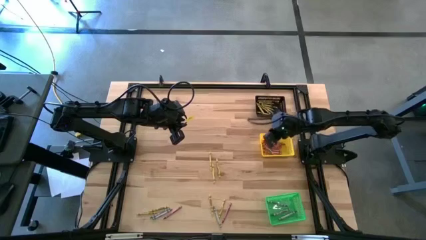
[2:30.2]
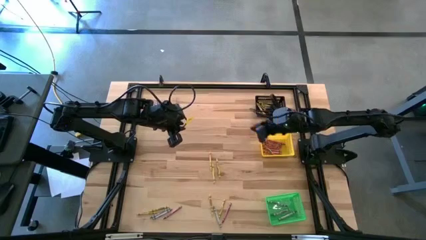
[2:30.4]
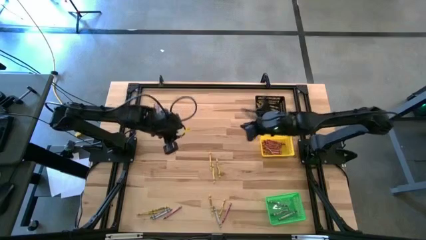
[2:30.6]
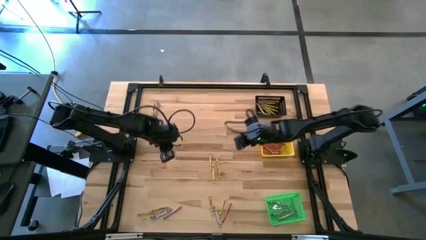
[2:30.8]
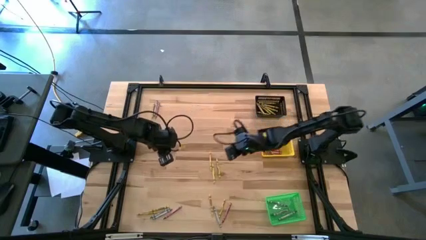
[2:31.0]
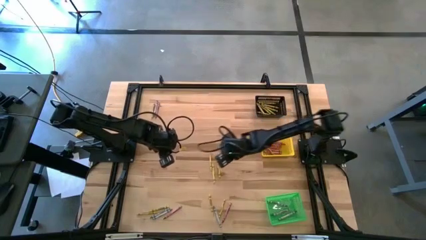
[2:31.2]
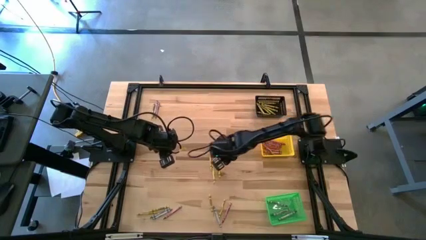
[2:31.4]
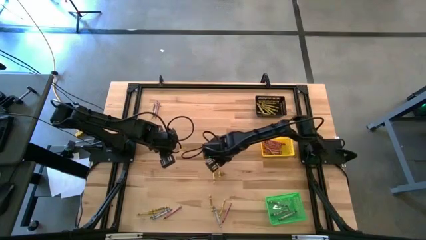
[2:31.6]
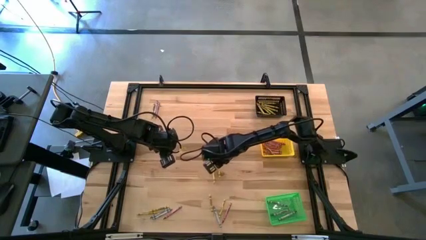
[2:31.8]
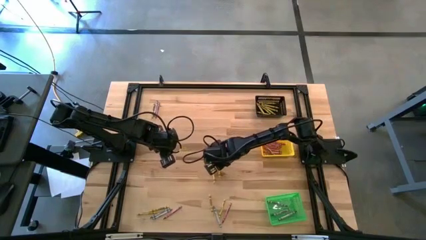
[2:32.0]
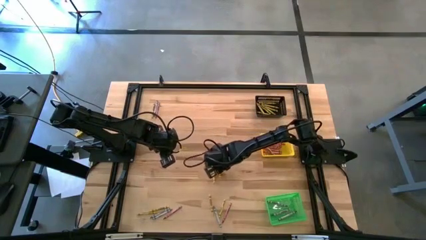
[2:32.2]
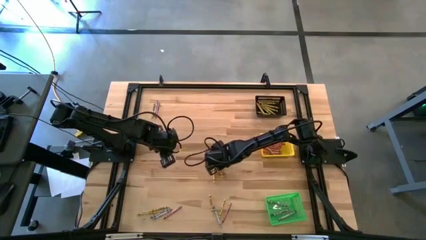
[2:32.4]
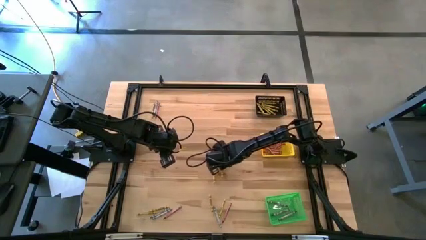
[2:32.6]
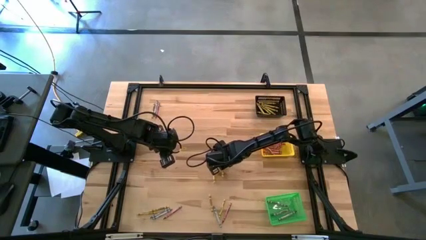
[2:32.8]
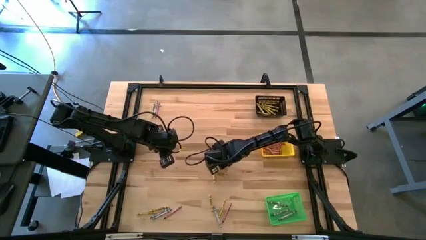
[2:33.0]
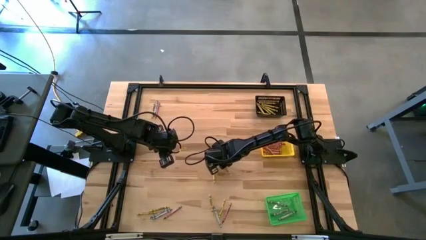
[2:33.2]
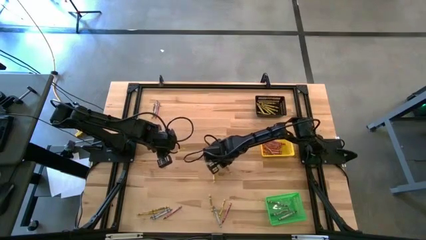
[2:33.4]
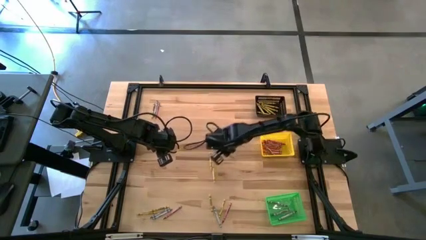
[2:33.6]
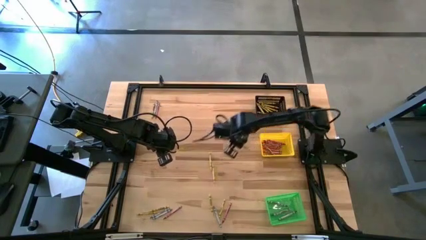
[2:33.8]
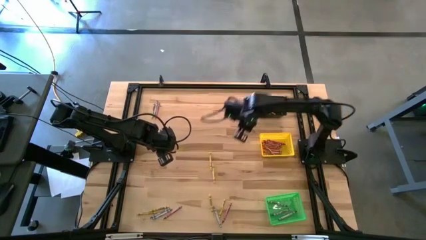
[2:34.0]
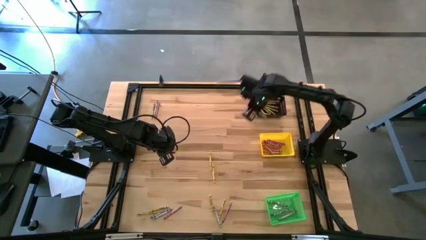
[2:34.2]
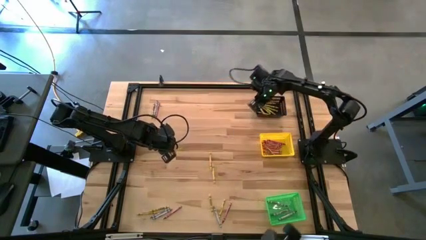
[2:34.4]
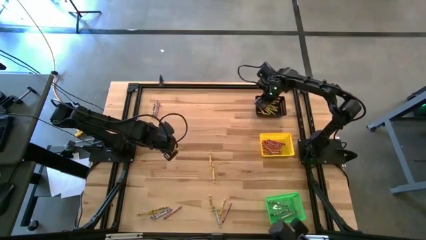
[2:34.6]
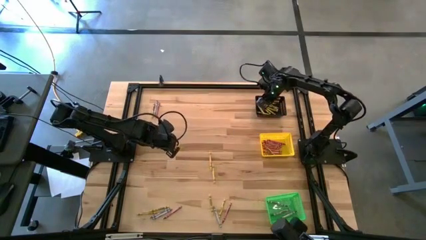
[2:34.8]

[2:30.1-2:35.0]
Task: Sort crayons
Put the yellow crayon into the black bin

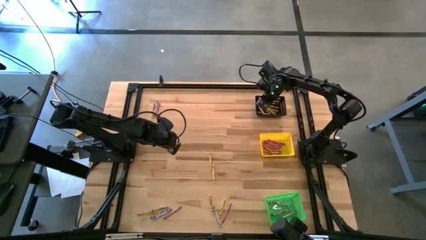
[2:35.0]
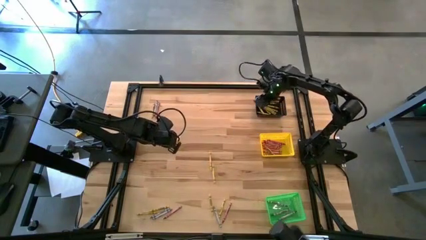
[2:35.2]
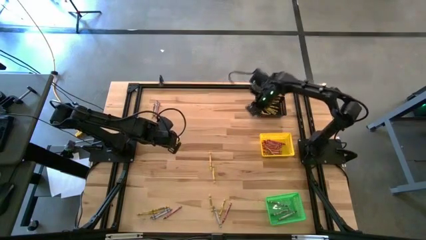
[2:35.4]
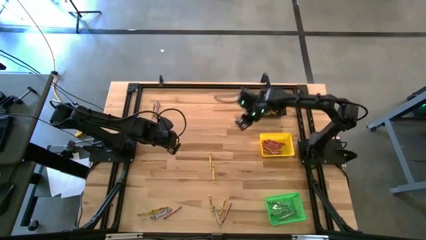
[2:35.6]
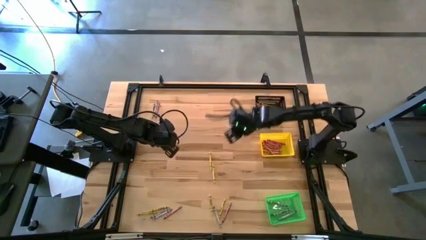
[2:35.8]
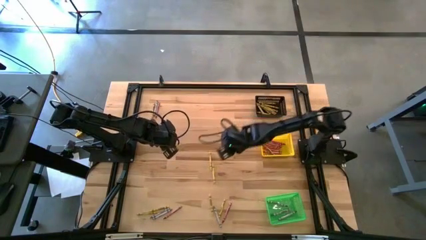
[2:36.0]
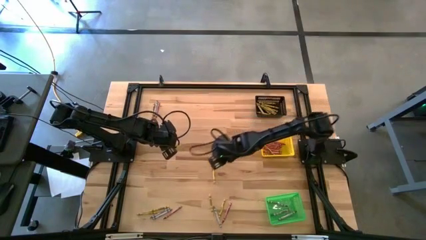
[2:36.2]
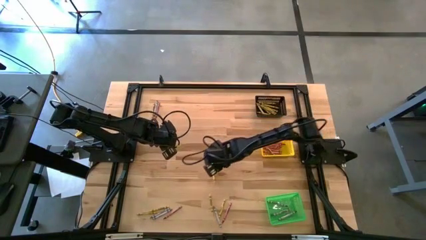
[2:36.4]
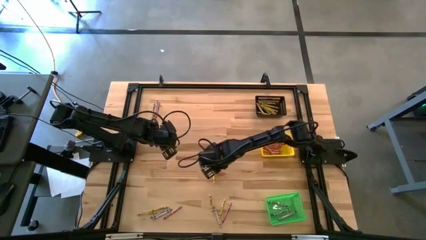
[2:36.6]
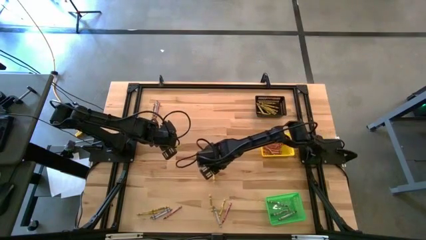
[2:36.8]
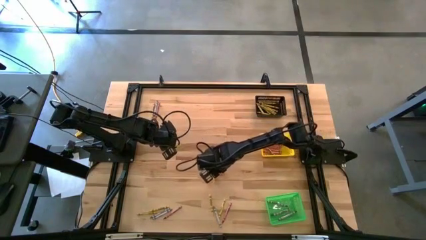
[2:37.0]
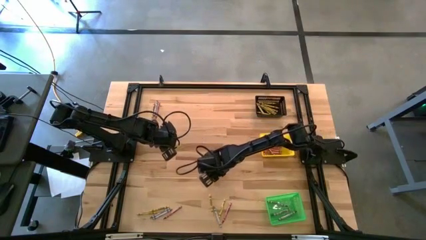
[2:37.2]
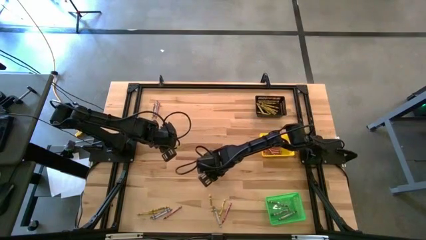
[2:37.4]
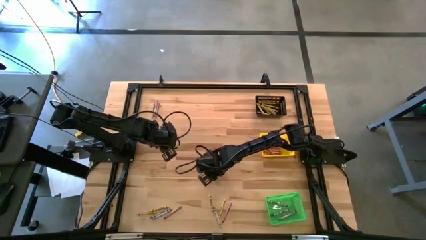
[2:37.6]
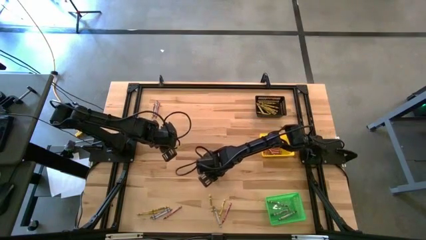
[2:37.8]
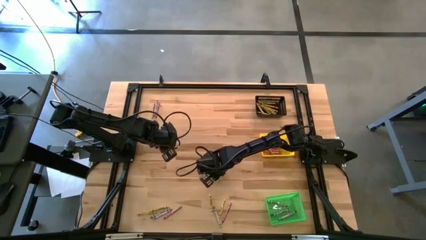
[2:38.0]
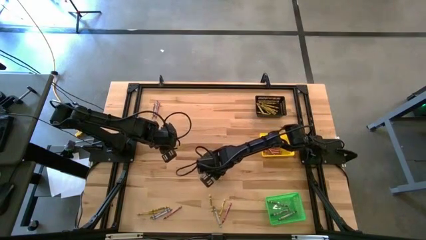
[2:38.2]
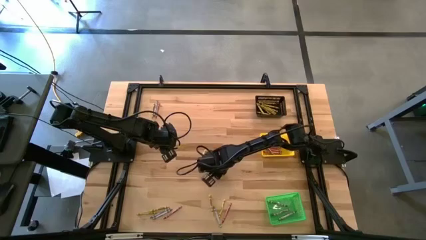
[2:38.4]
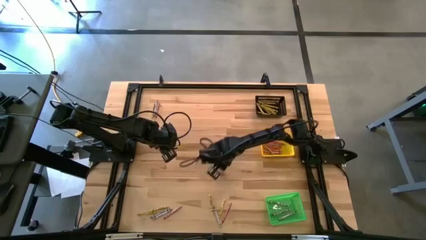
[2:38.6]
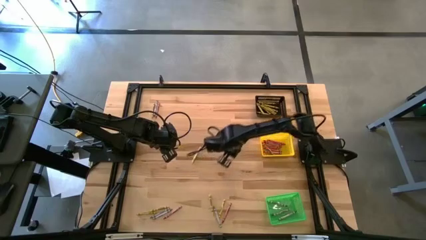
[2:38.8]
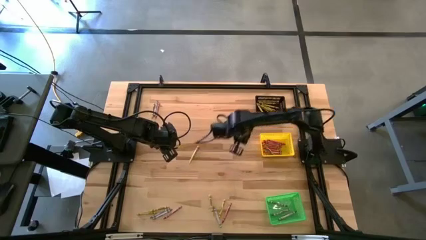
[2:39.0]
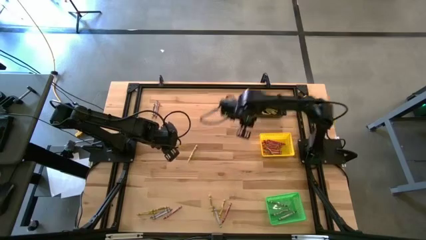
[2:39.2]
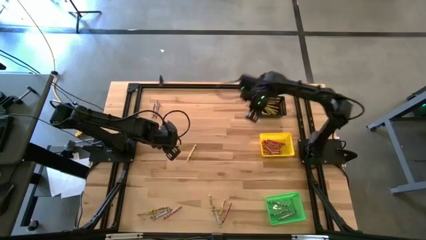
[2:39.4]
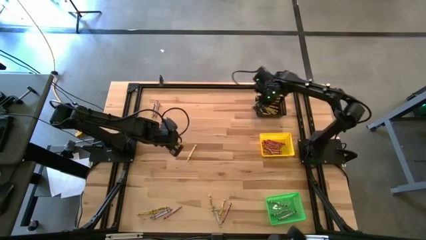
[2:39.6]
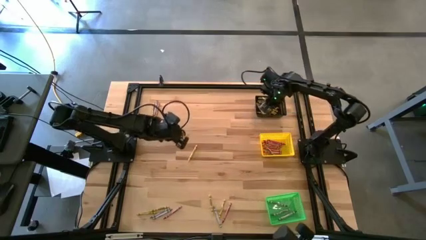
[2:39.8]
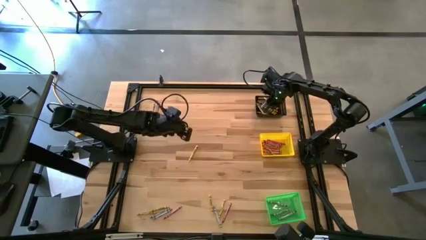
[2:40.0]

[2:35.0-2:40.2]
Put the yellow crayon into the black bin

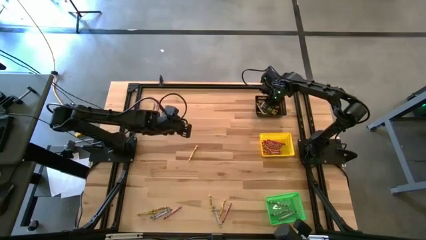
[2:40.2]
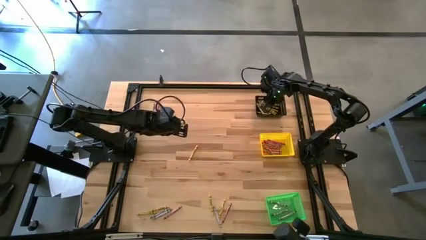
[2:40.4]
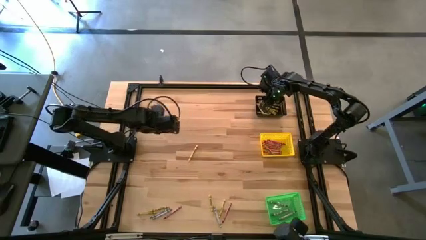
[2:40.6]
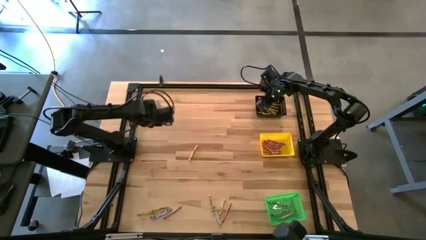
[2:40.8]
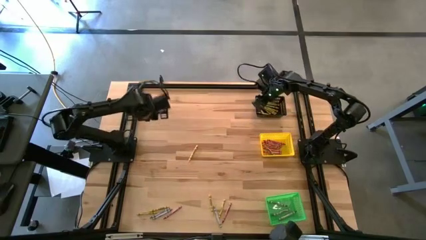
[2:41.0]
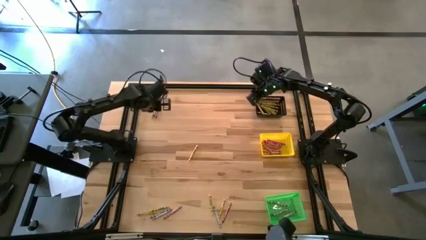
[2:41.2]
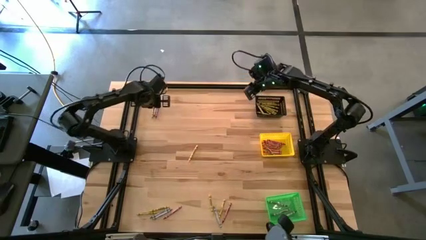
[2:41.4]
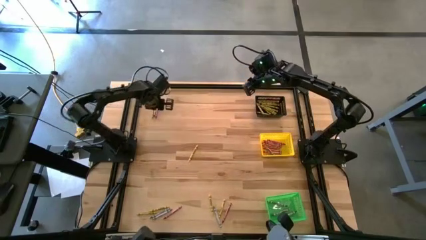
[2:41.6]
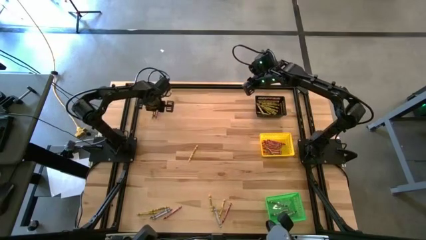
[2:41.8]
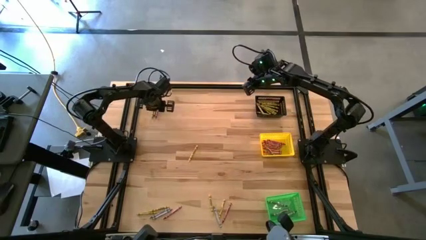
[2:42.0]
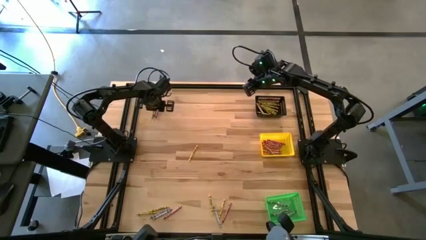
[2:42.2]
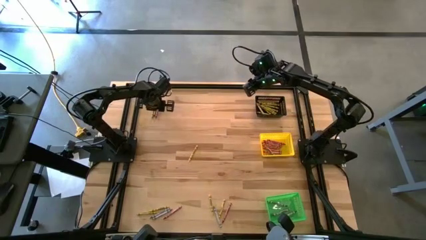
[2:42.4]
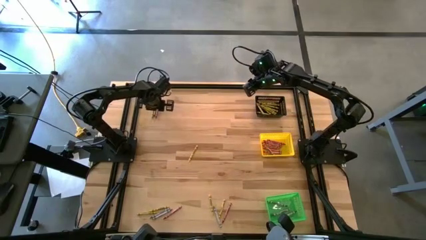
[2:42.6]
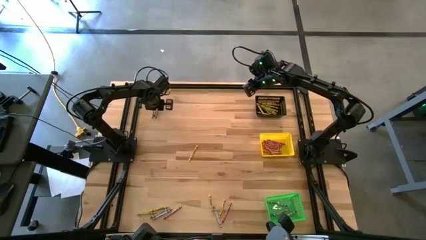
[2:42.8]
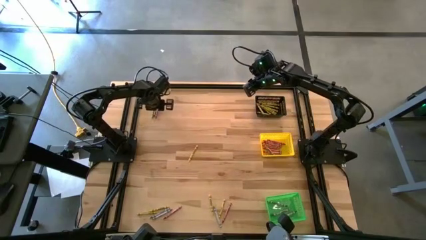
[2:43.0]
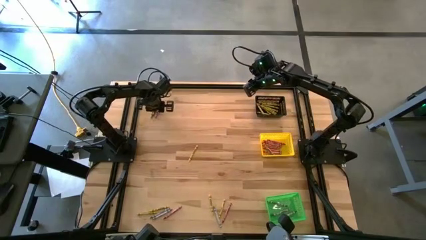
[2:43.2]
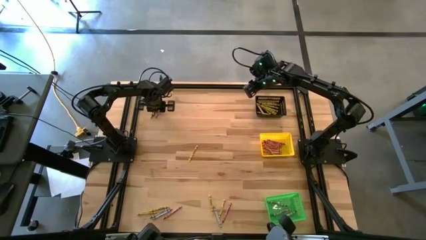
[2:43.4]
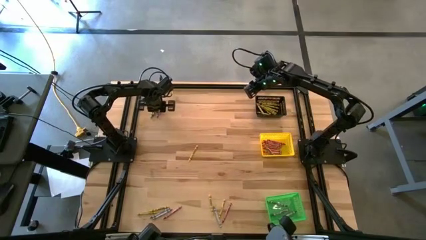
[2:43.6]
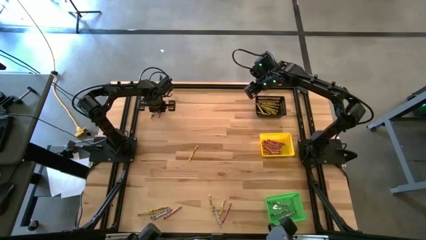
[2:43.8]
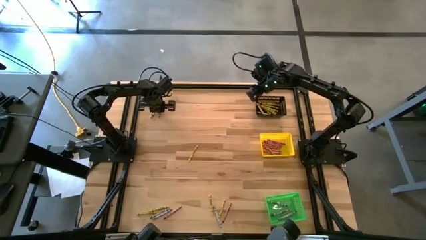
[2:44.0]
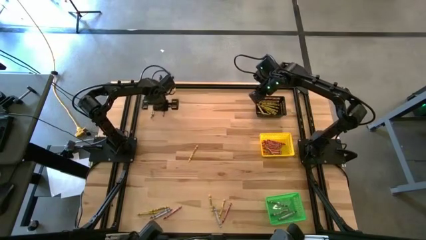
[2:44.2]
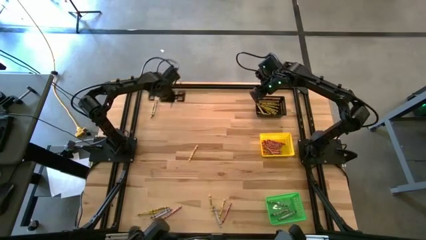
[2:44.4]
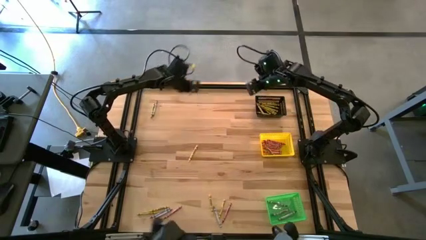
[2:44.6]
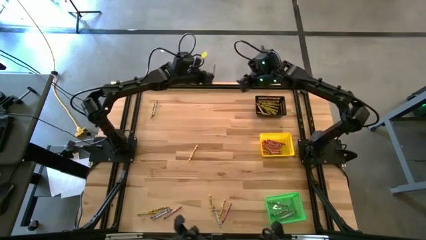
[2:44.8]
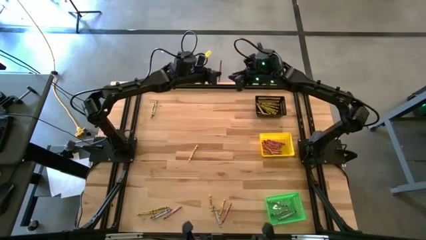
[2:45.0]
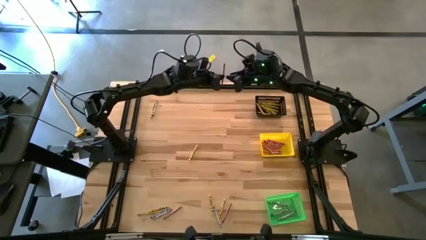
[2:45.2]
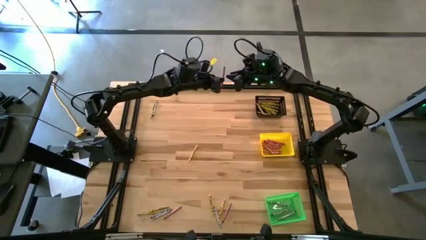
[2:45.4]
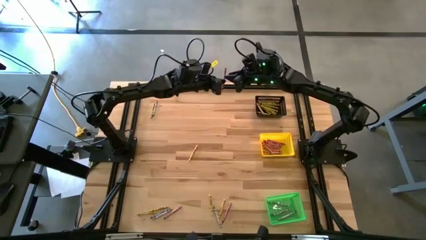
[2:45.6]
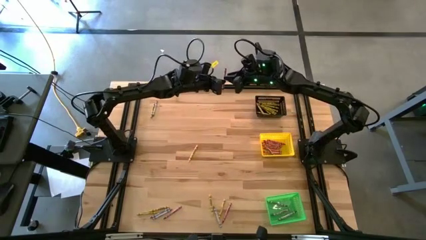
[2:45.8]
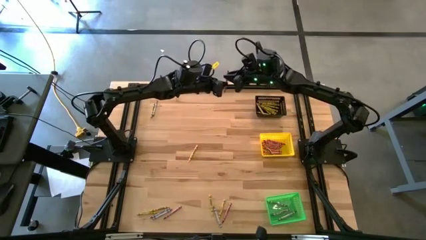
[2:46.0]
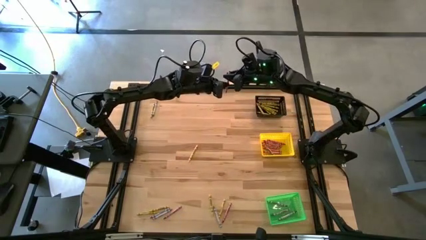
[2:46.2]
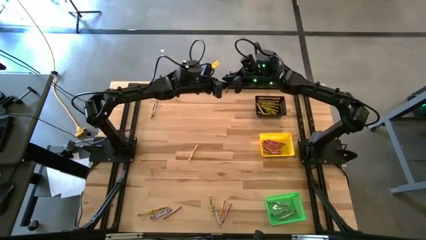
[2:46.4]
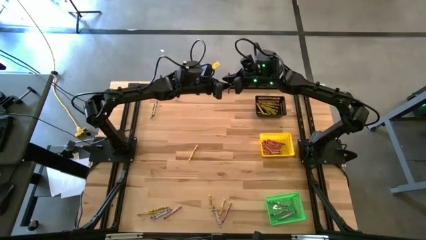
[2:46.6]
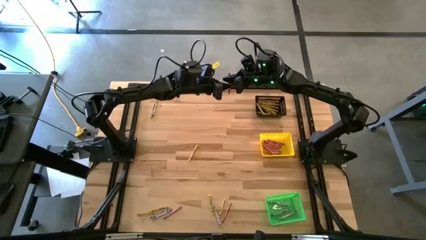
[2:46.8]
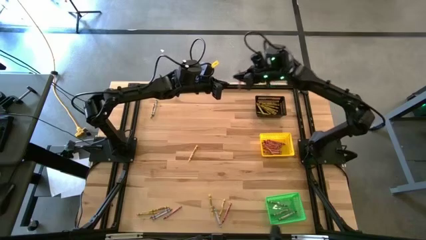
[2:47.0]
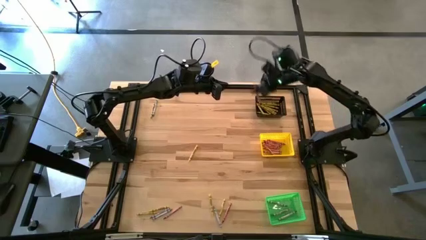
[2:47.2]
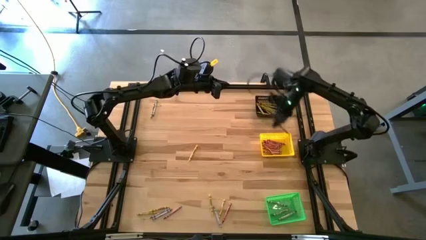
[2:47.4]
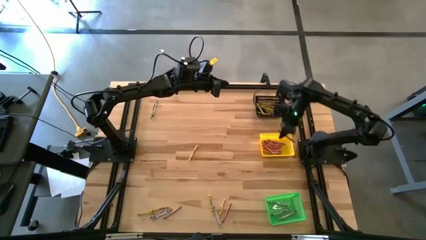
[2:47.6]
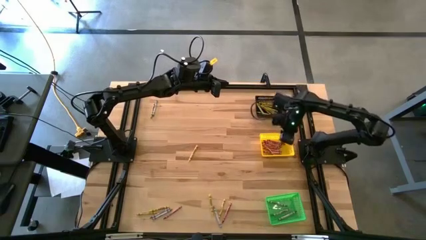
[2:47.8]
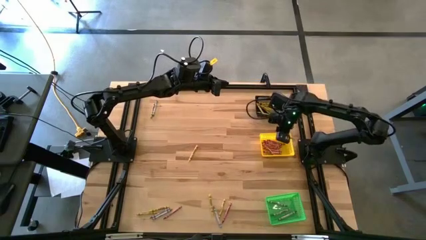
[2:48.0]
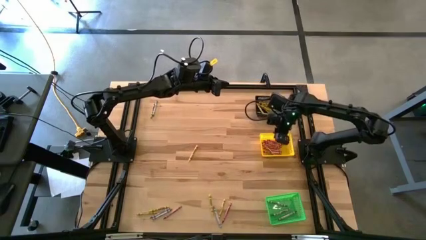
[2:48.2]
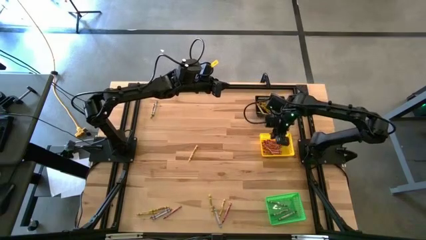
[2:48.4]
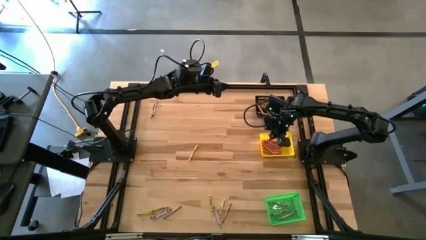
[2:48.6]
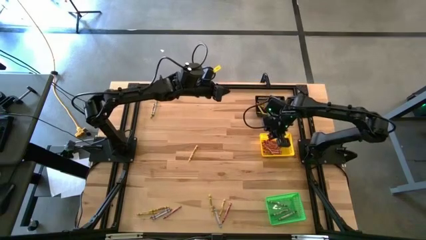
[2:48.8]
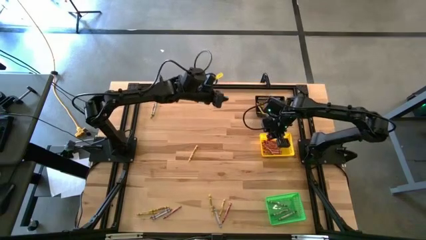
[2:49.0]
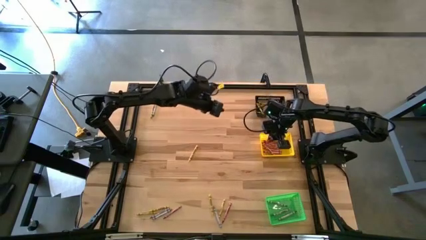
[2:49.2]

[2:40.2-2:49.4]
Put the red crayon into the yellow bin
